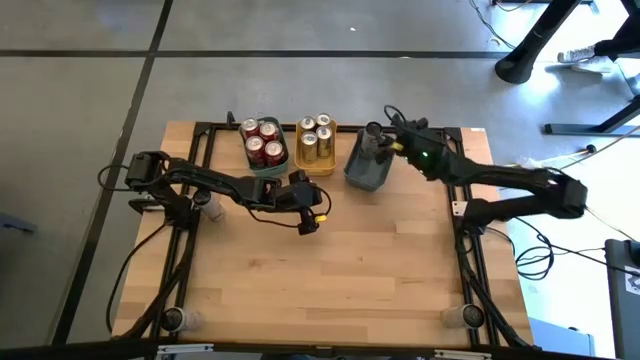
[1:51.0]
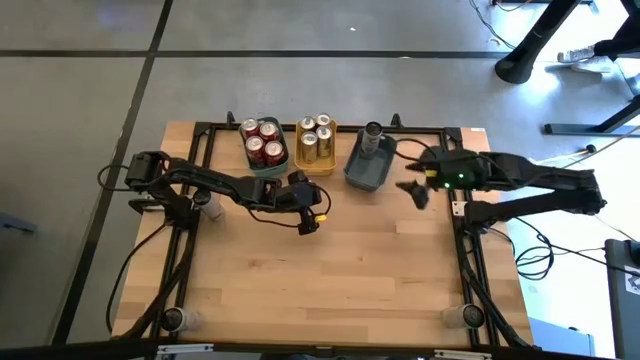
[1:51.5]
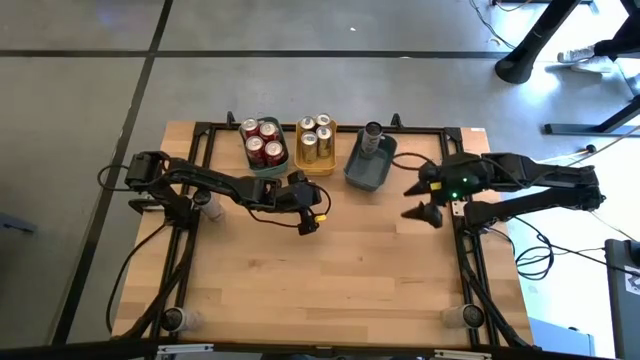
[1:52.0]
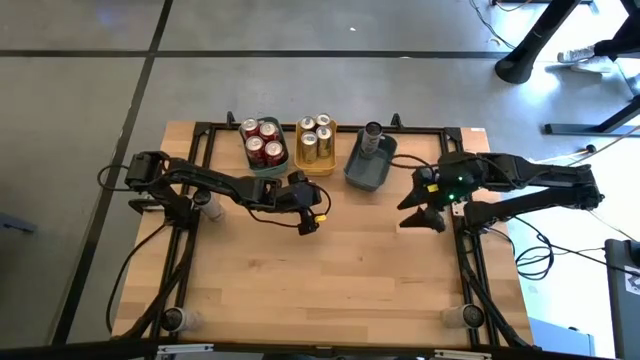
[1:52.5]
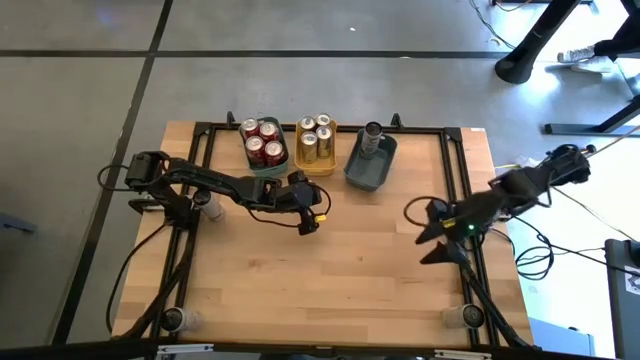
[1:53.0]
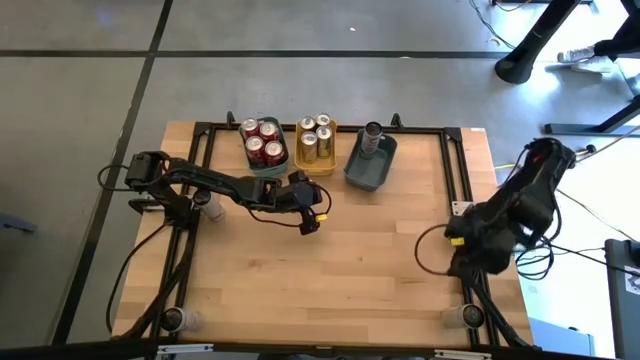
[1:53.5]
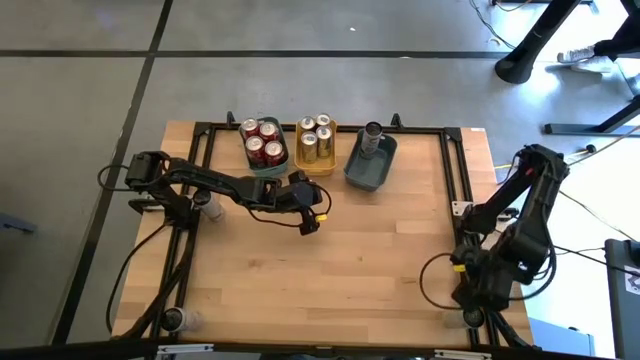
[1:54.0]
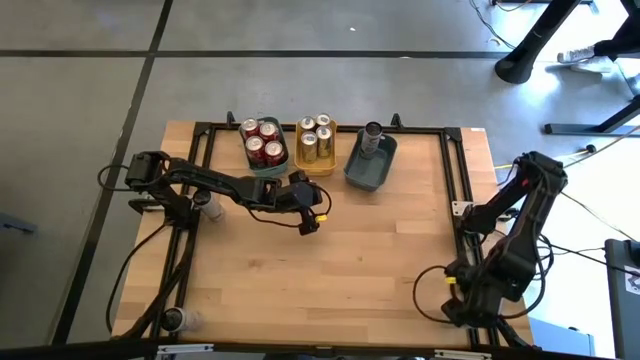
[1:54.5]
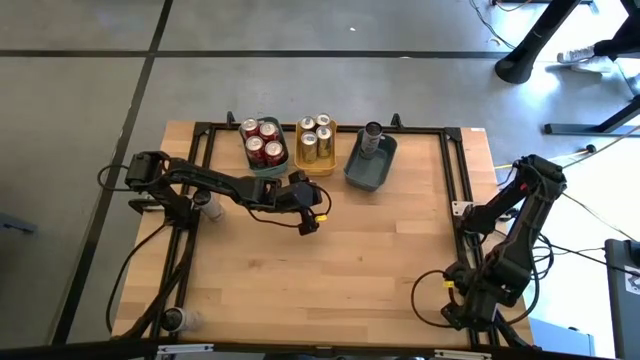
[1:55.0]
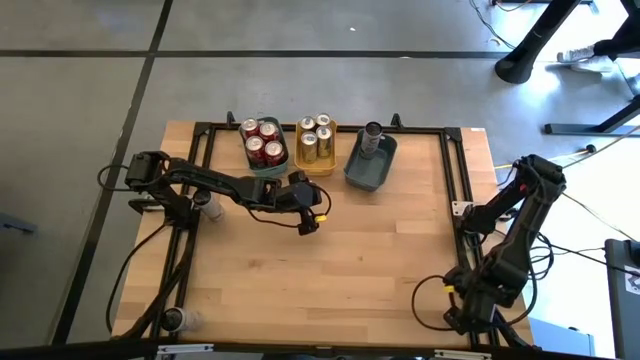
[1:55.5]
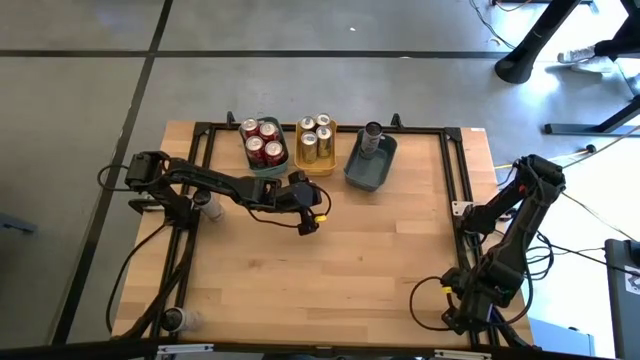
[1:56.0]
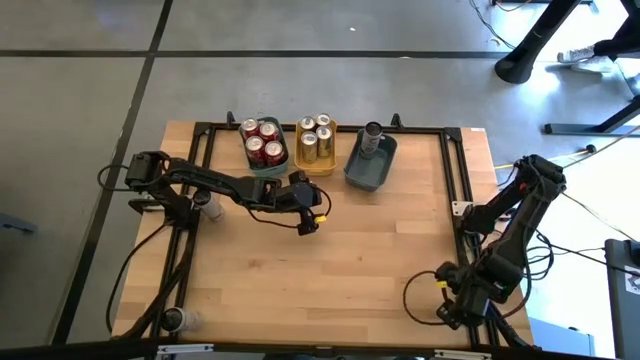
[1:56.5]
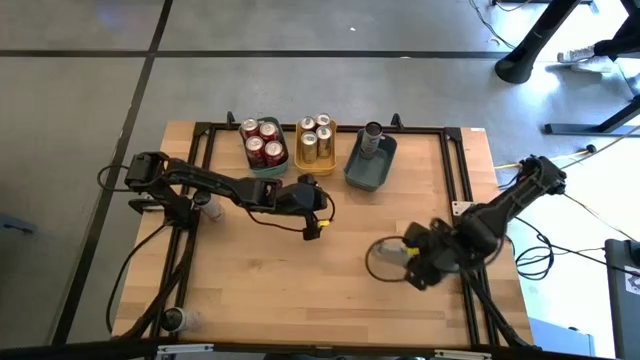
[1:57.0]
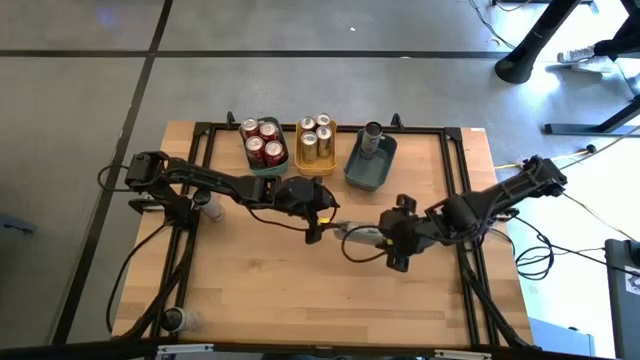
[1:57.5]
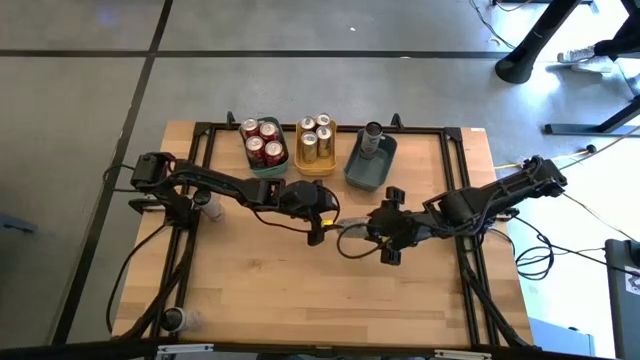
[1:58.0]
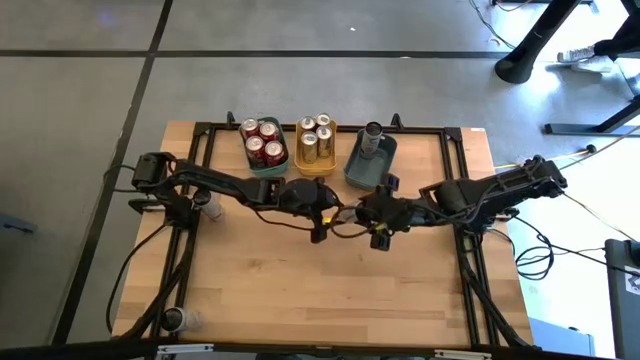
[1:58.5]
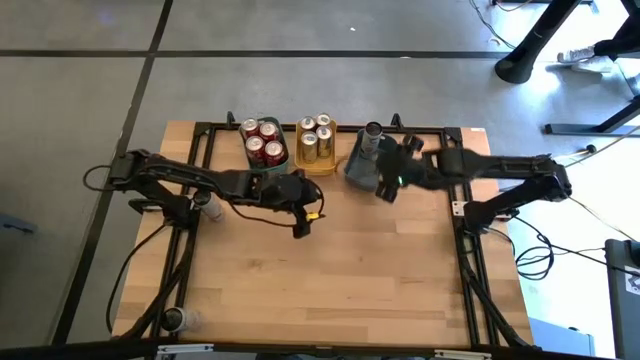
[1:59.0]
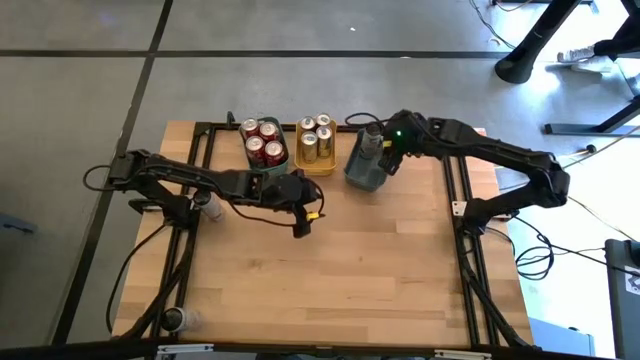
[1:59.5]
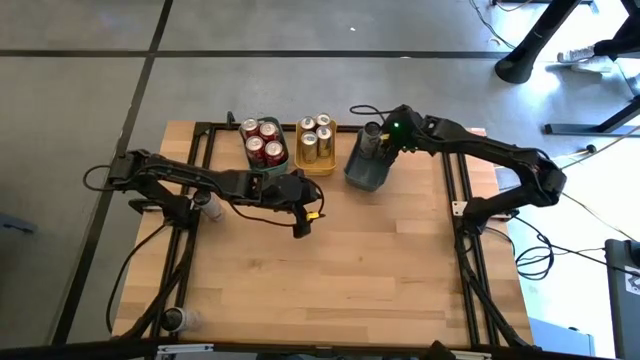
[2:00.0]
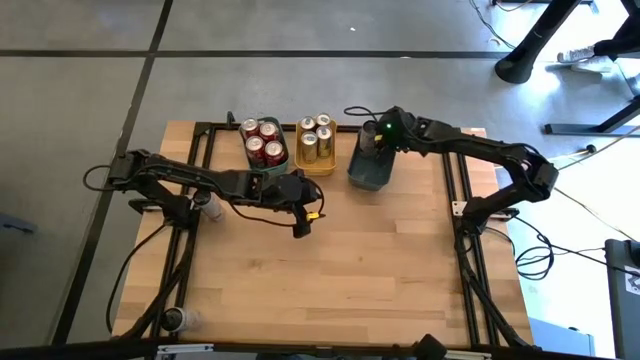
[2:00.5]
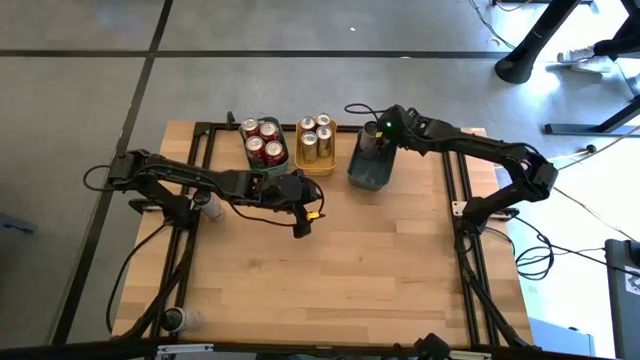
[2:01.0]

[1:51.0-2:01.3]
Task: Sort soda cans
Put the right white-pink soda can into the blue bin

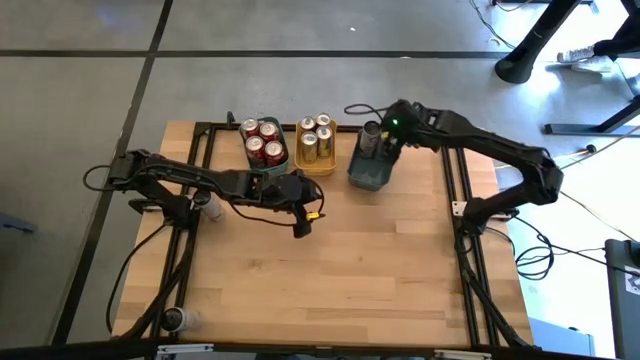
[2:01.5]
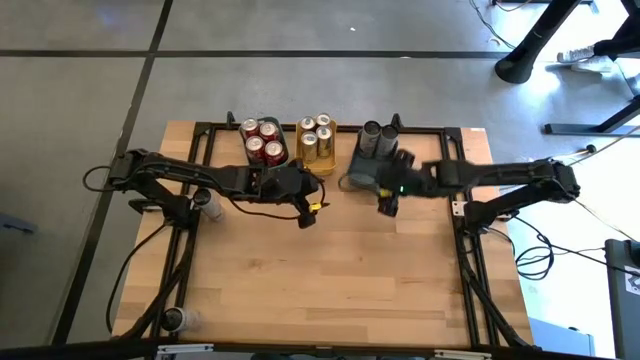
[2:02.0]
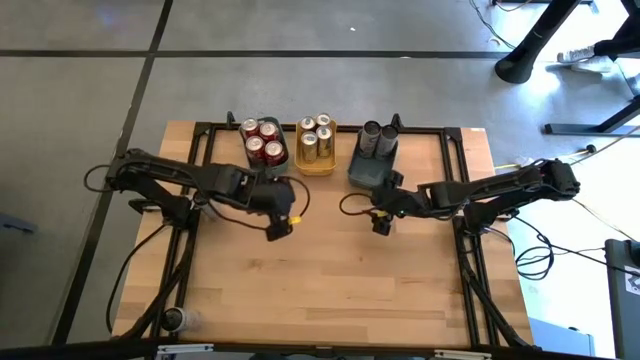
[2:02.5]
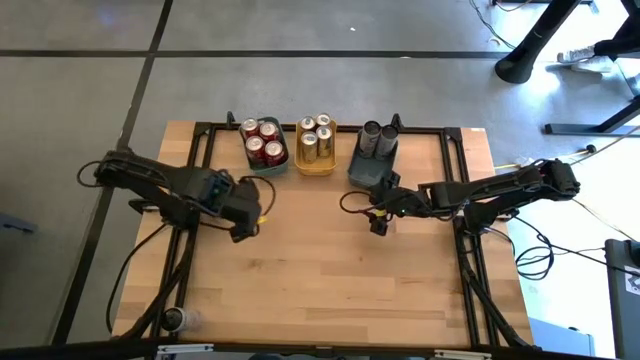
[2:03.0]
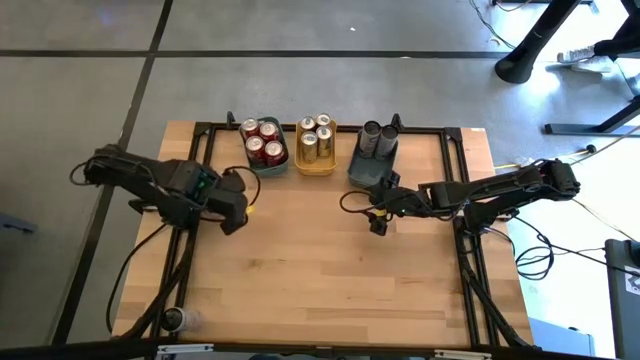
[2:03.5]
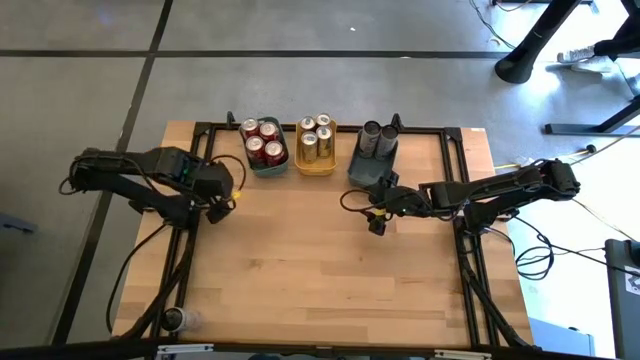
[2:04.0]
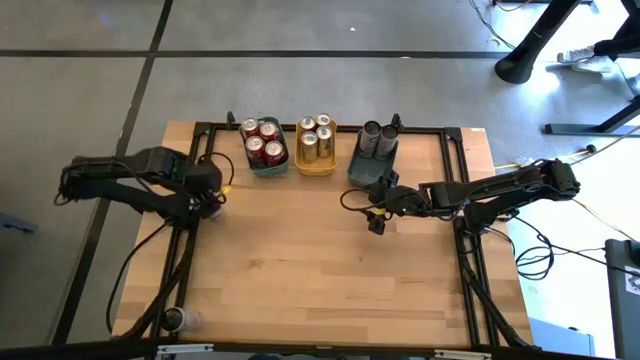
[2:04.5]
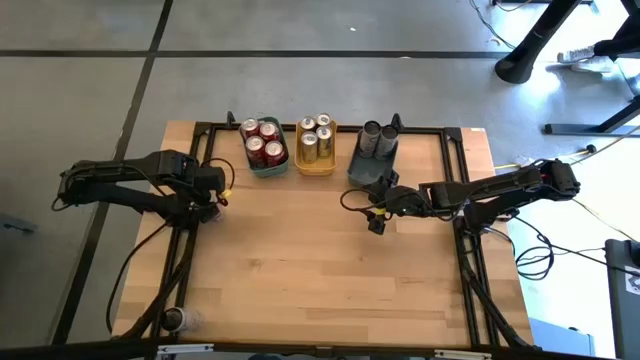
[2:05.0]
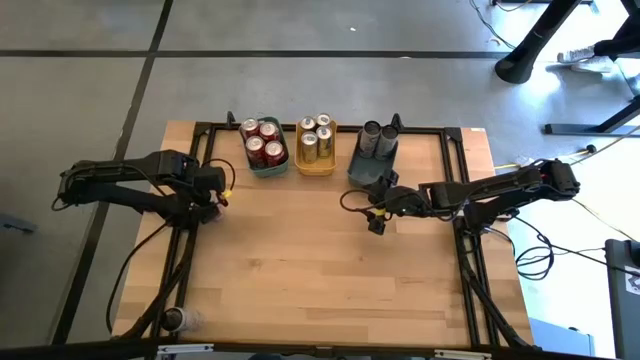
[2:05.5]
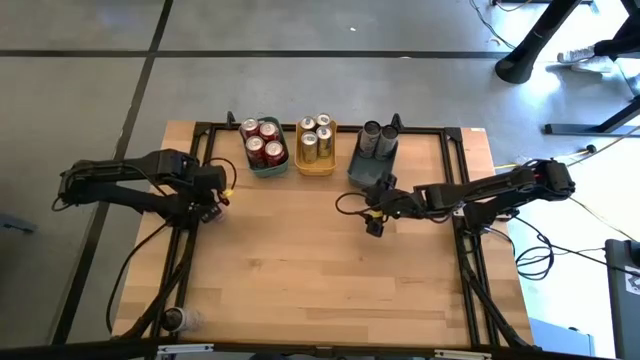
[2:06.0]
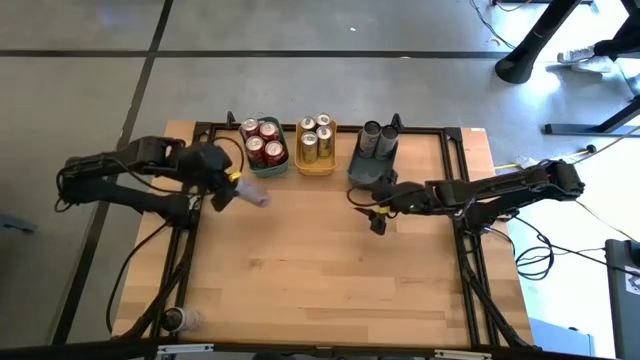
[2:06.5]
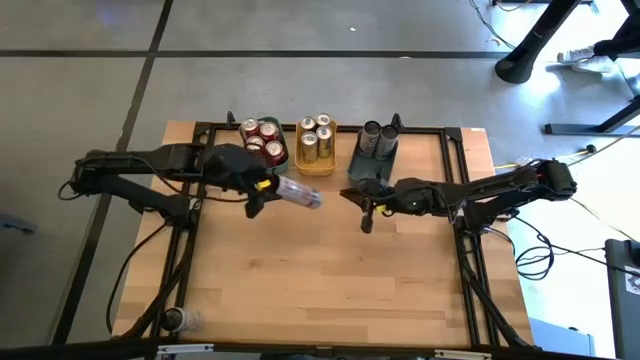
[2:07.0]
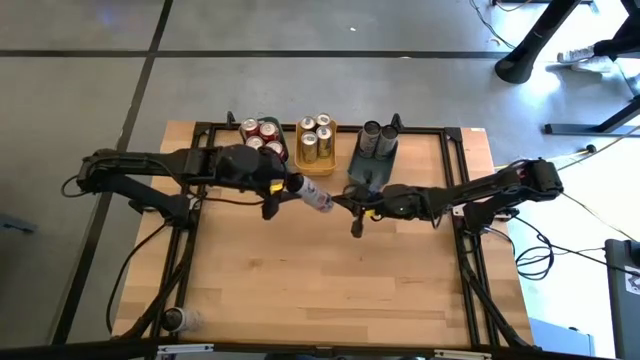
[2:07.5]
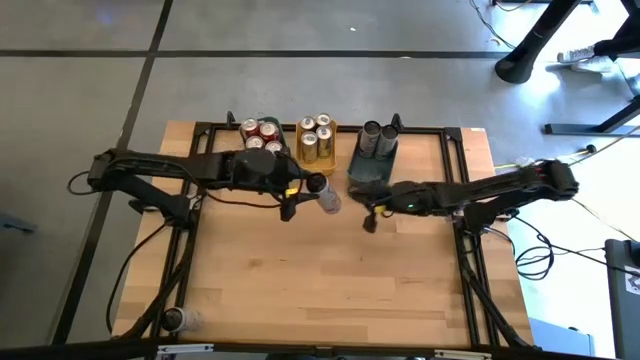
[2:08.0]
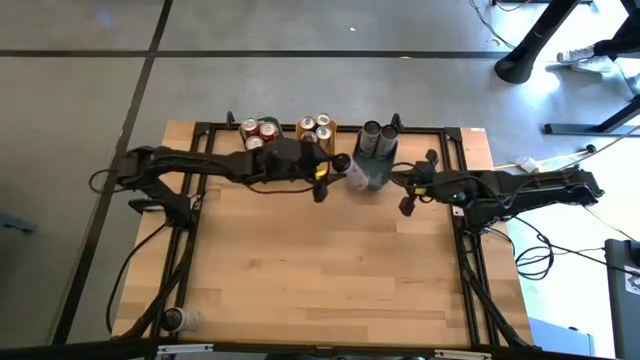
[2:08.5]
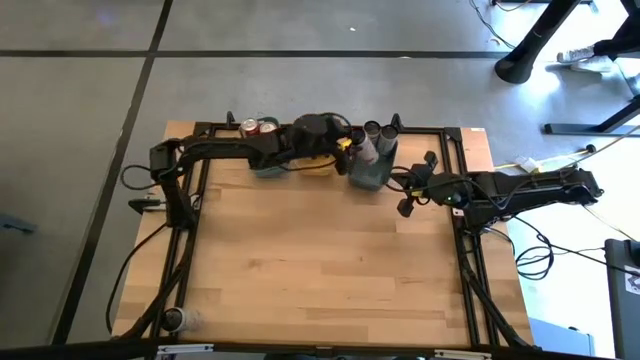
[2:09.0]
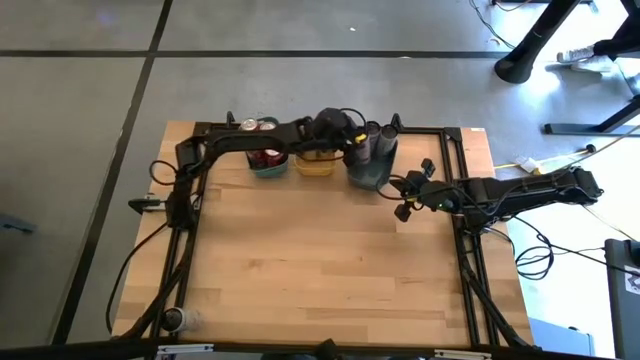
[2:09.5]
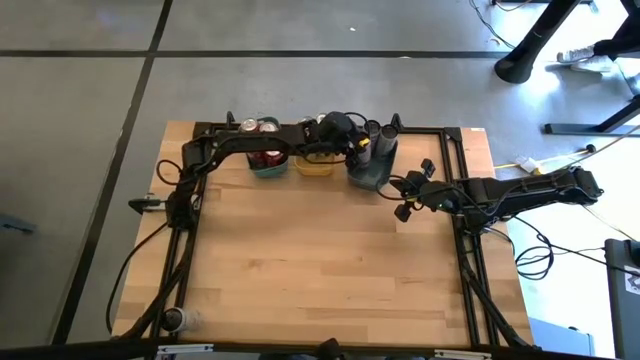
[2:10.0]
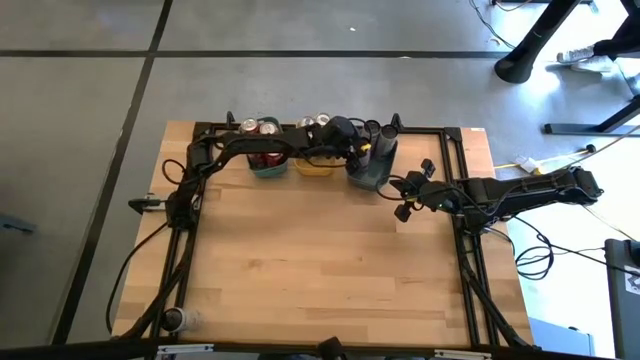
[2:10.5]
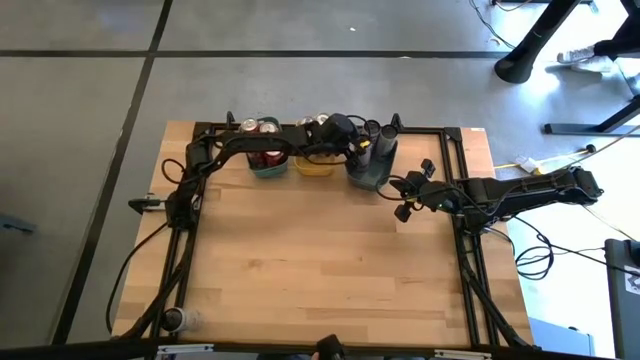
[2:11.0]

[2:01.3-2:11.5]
Put the top white-pink soda can into the blue bin

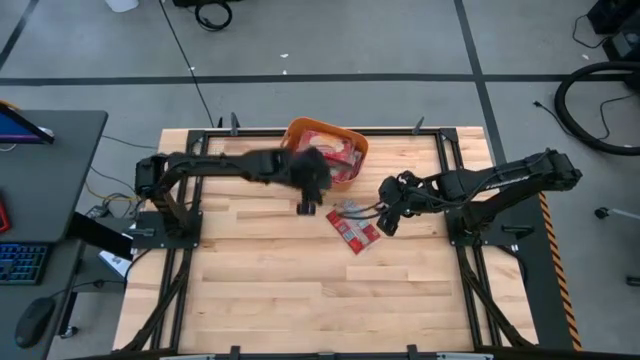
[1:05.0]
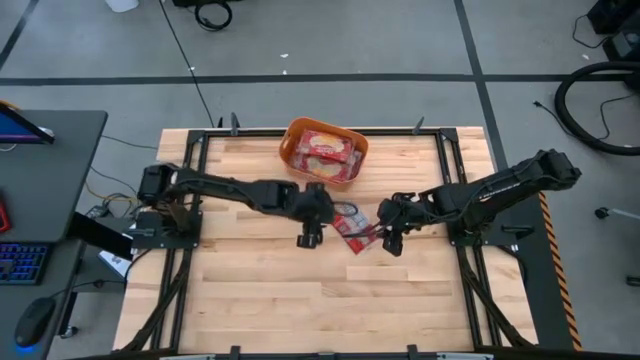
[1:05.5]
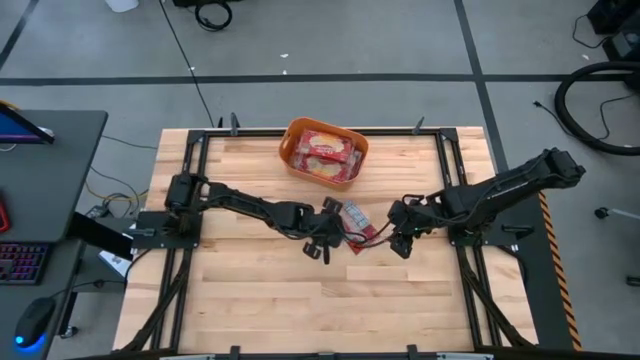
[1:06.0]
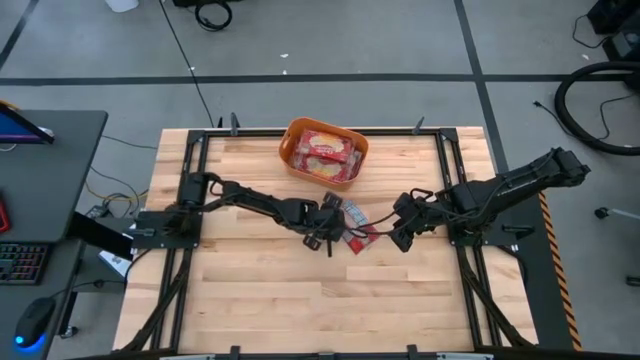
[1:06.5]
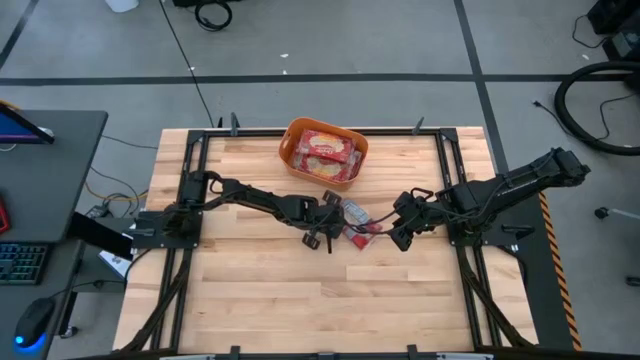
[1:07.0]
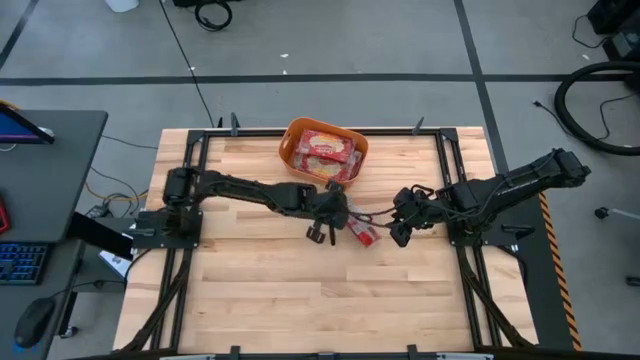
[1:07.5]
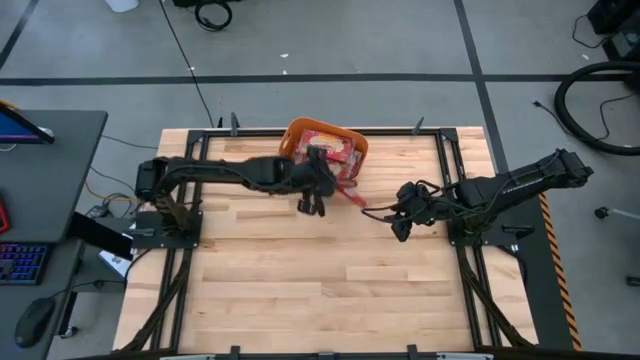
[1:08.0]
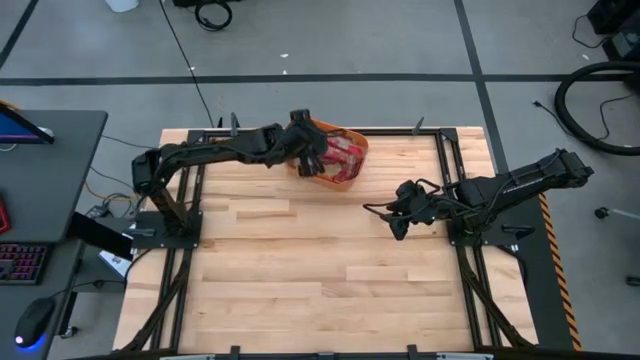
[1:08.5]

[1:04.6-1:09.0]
Task: Sort popcorn bags into baskets
Put the red popcorn bag into the orange bin
